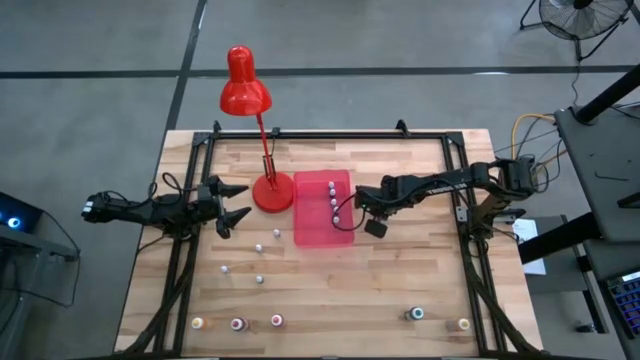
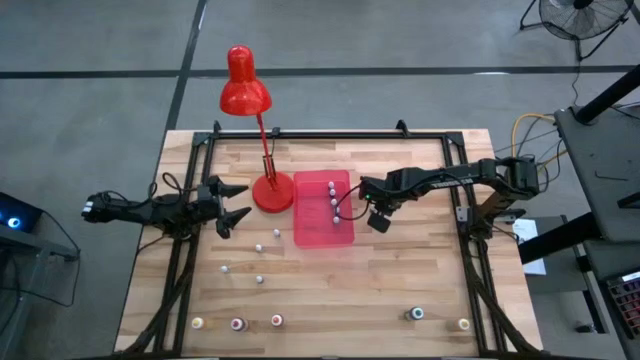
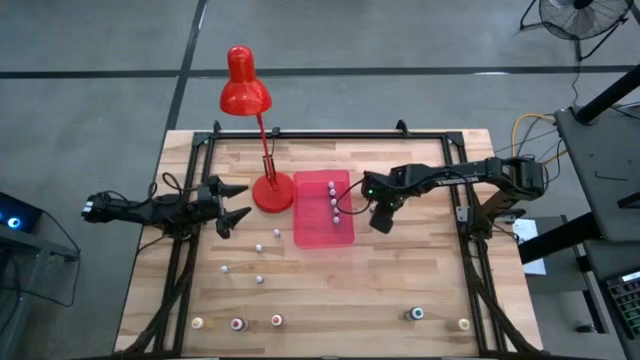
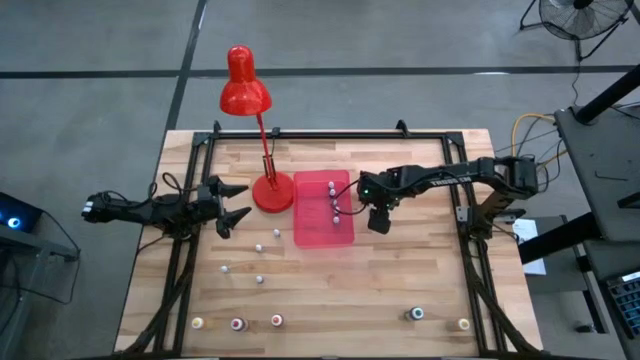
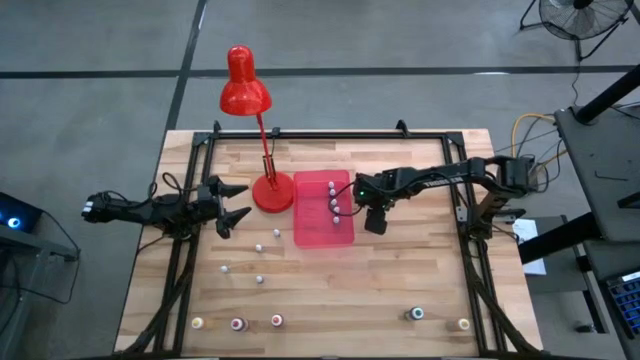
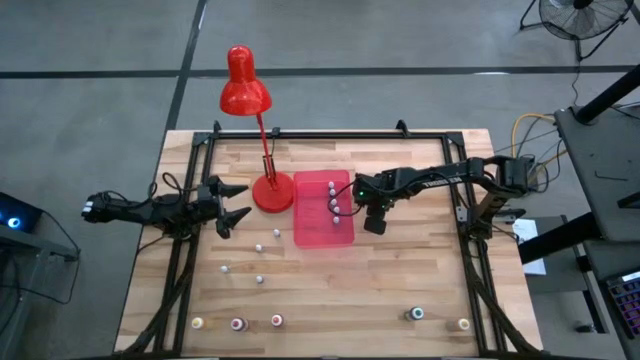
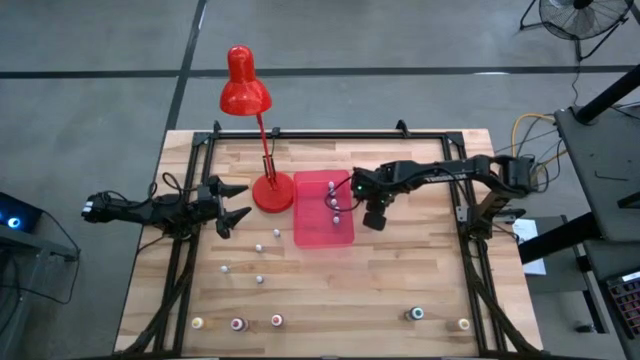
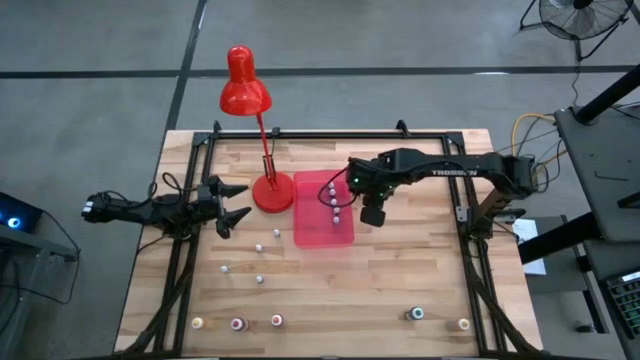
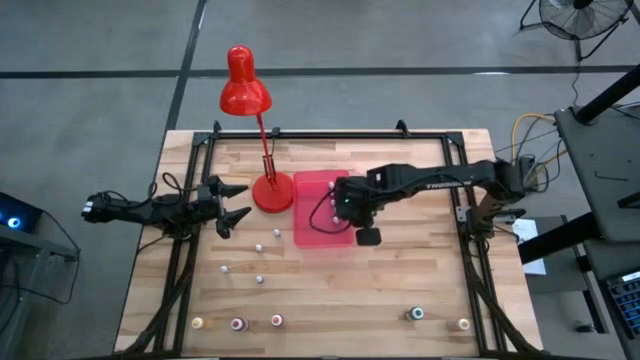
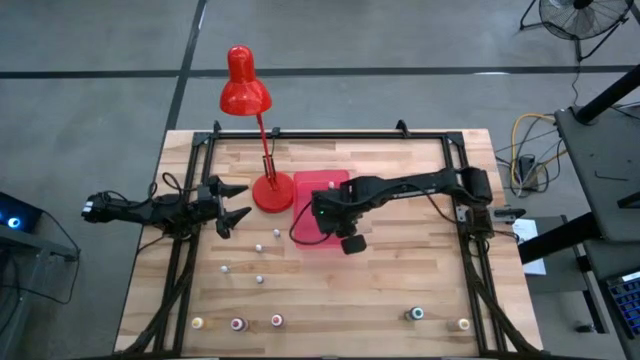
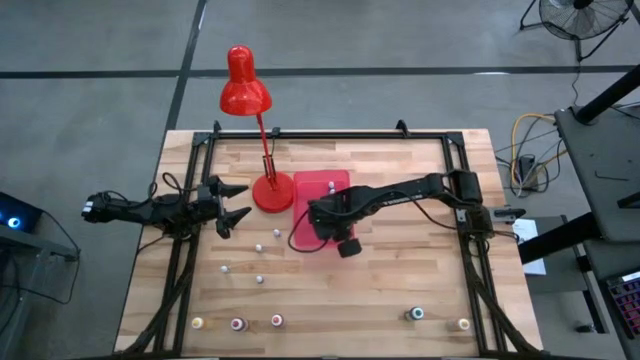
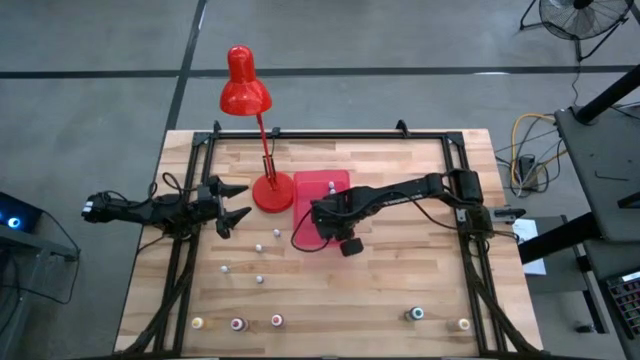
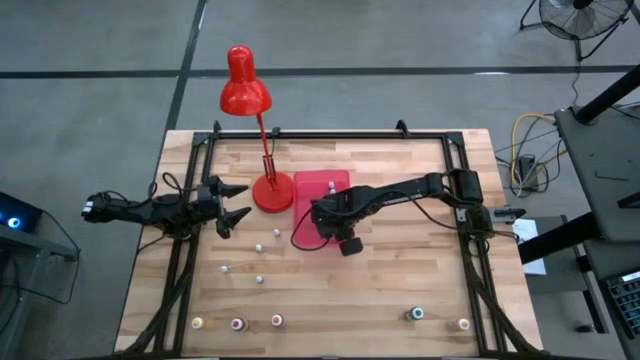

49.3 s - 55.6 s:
Task: Pick & Place food coloring
Put the small red food coloring bottle into the bin

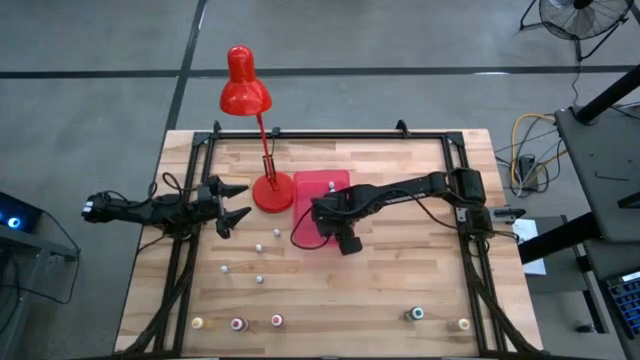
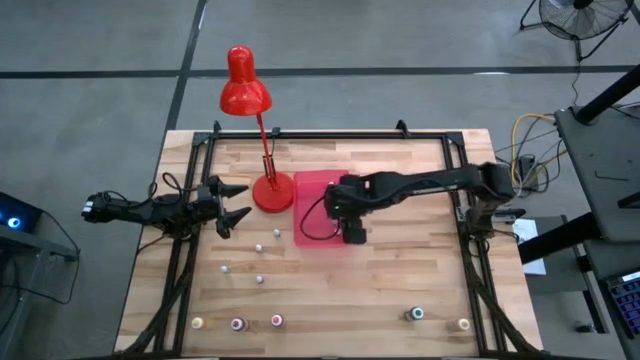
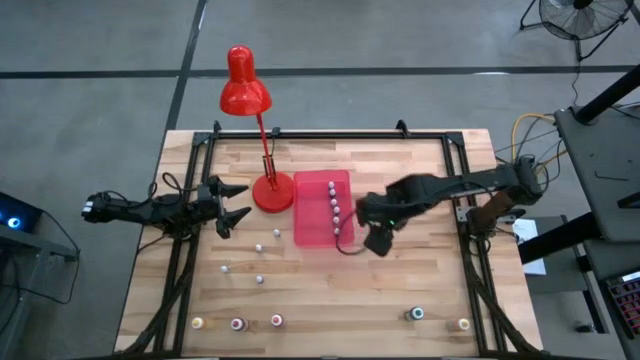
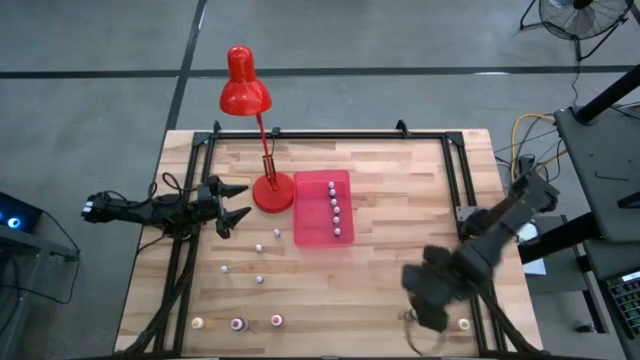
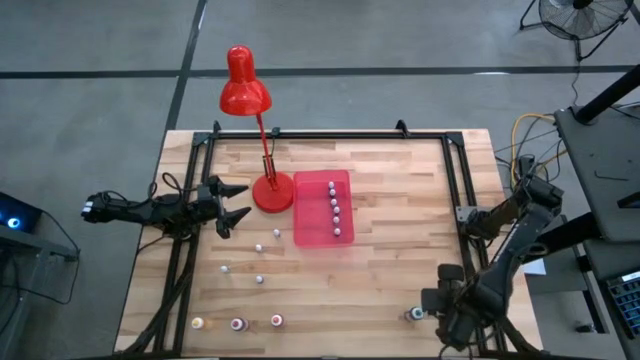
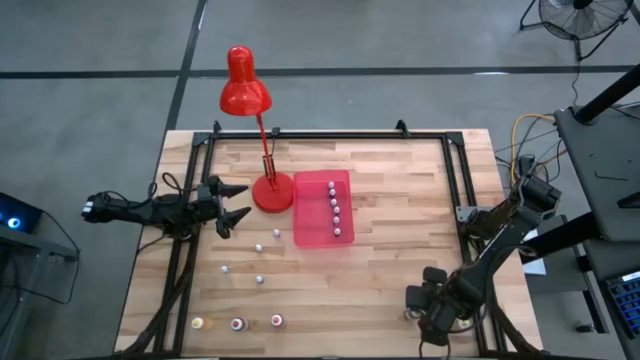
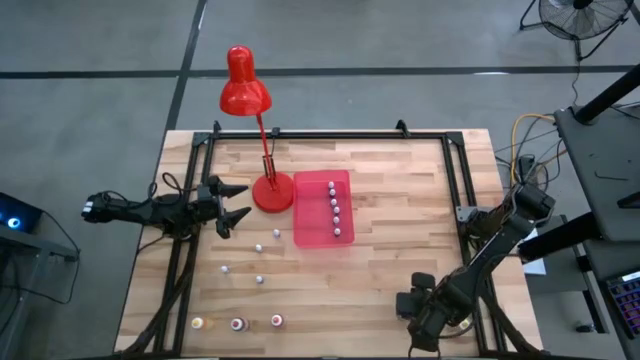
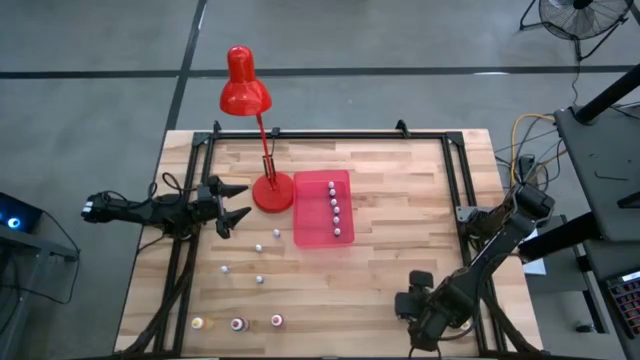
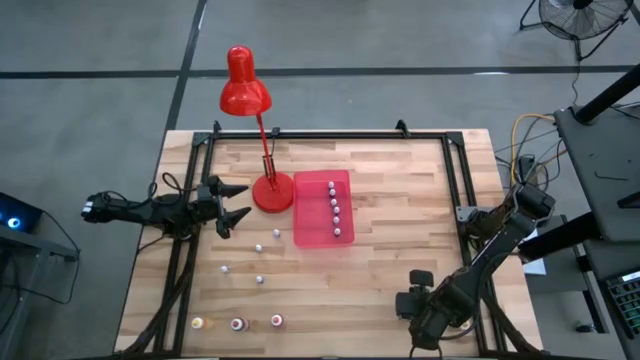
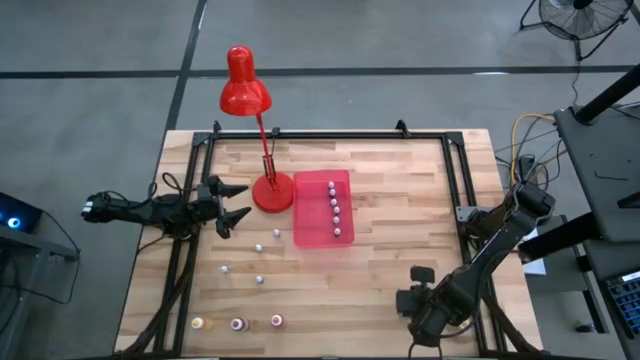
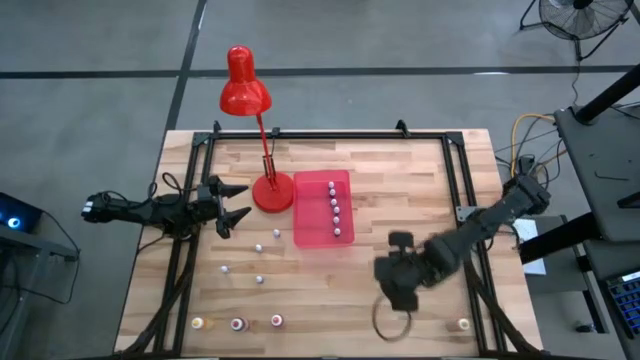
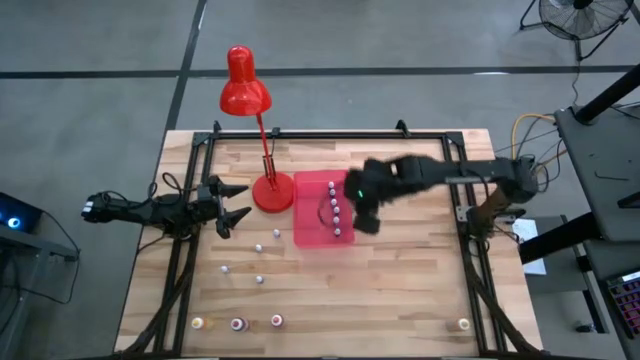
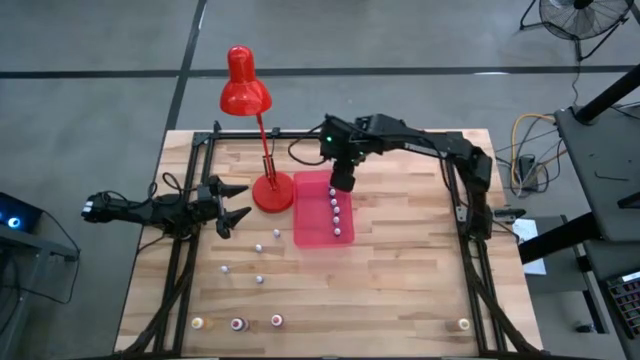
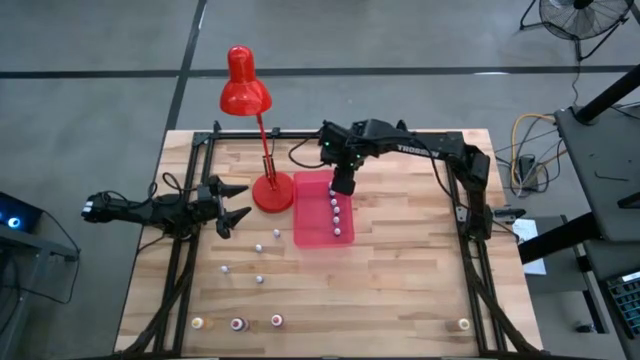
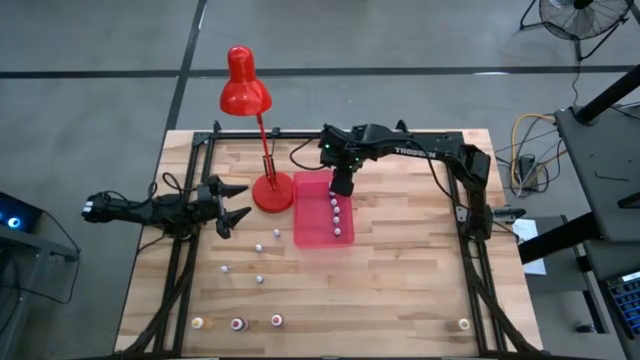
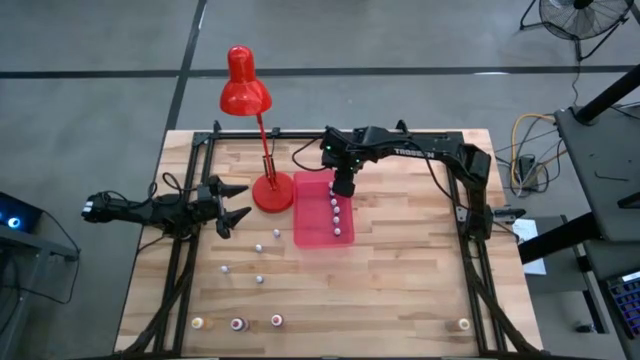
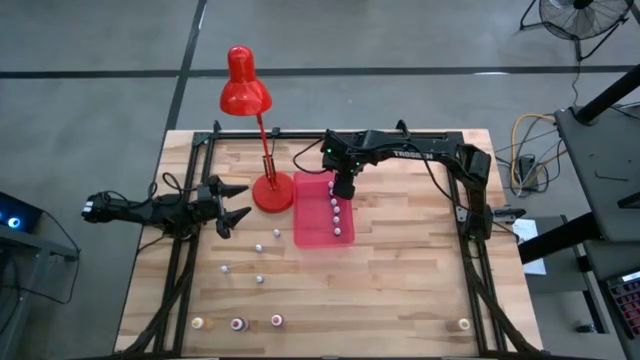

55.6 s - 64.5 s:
Put the big green food coloring bottle into the bin

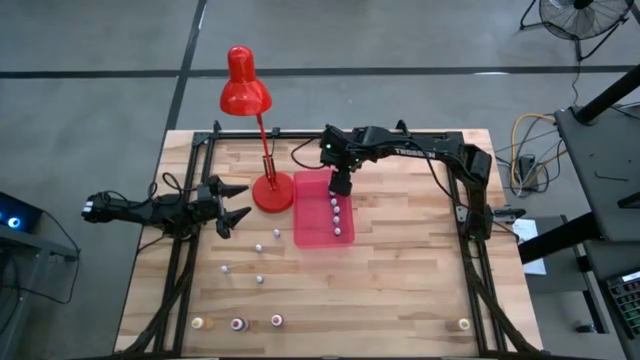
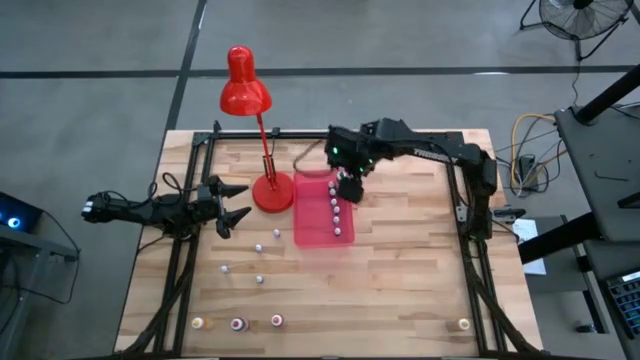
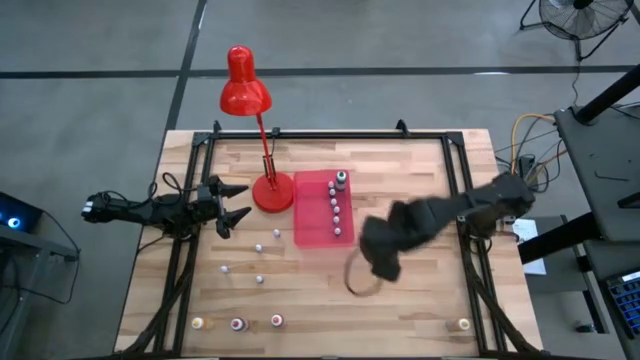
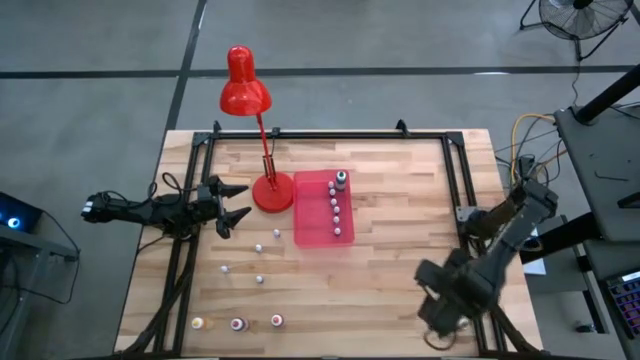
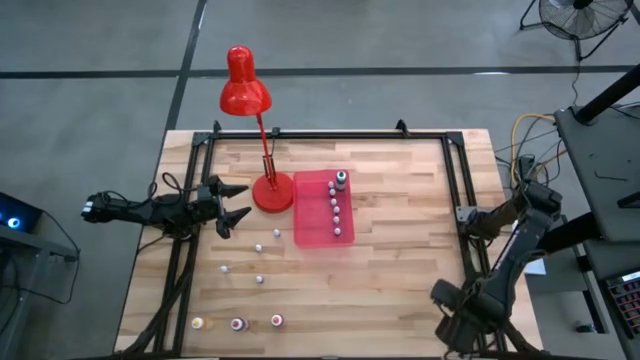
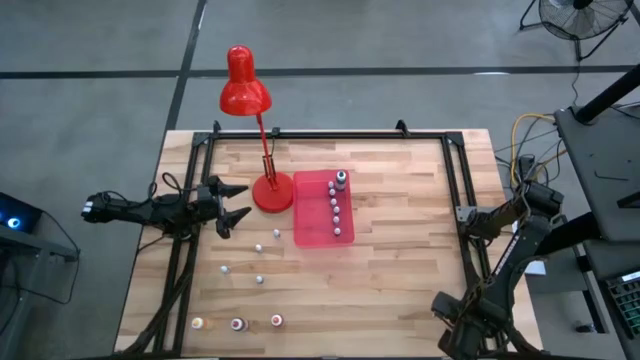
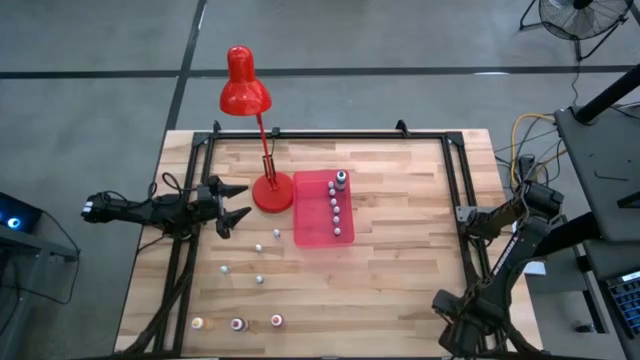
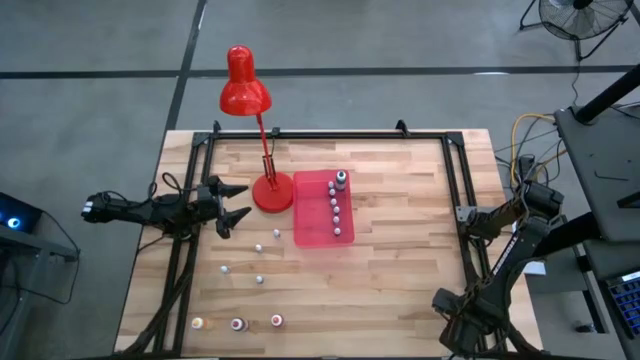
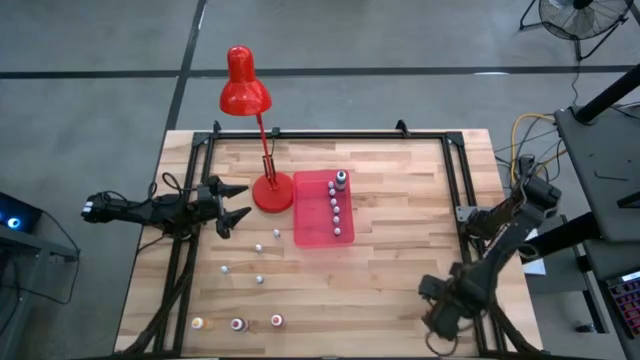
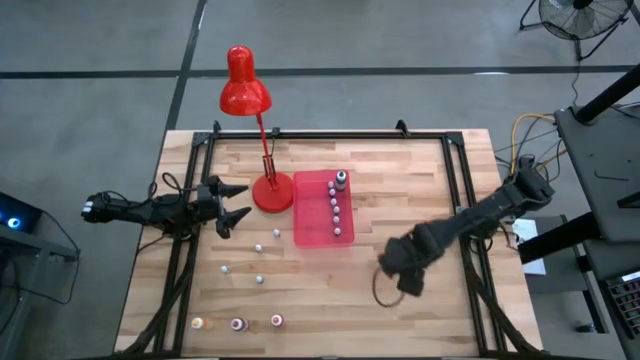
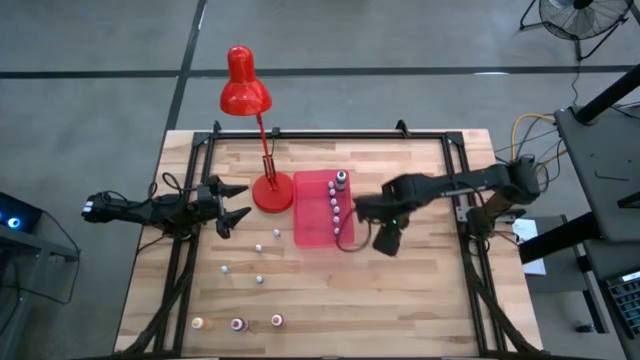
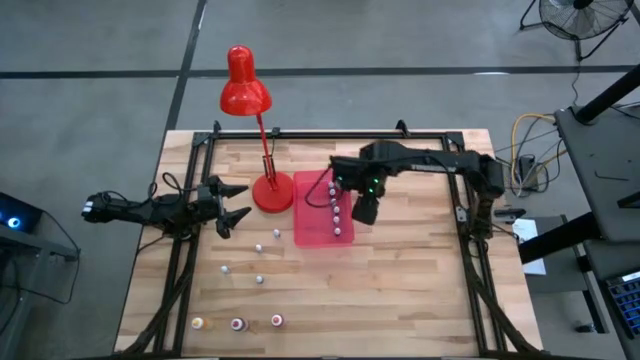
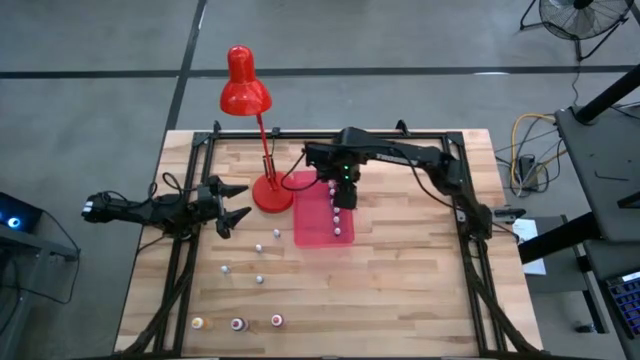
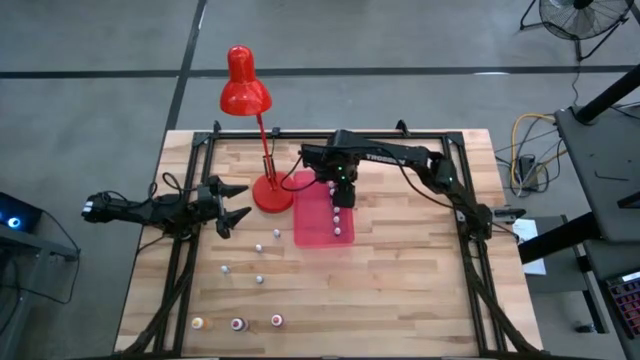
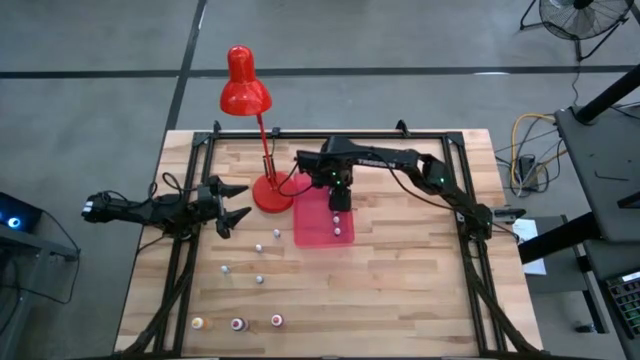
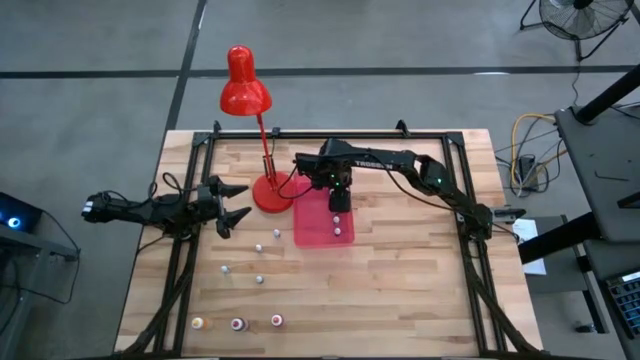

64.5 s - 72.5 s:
Put the big yellow food coloring bottle into the bin
